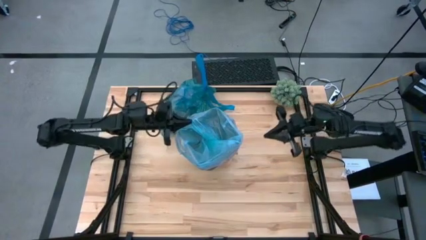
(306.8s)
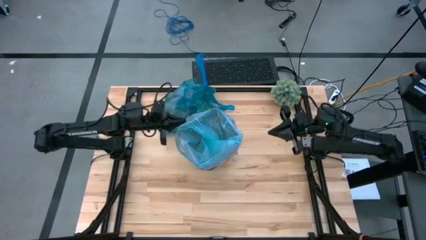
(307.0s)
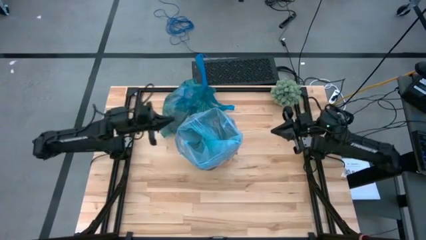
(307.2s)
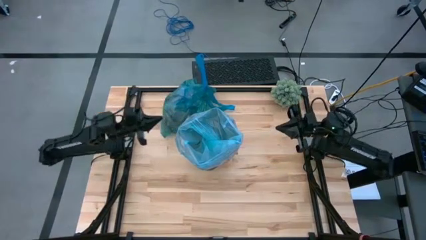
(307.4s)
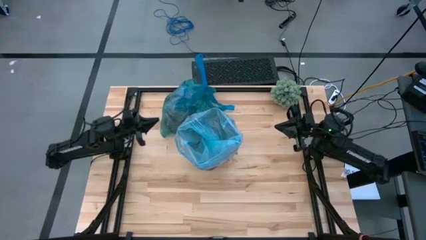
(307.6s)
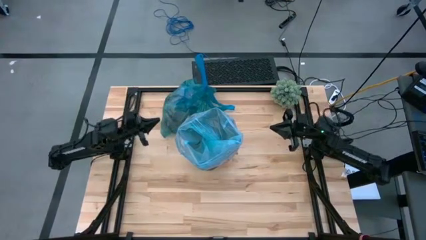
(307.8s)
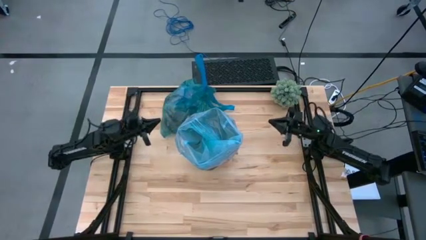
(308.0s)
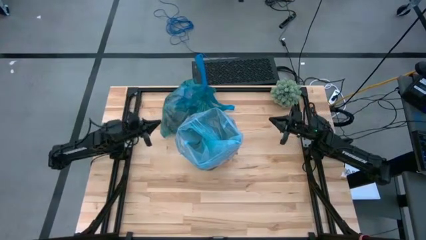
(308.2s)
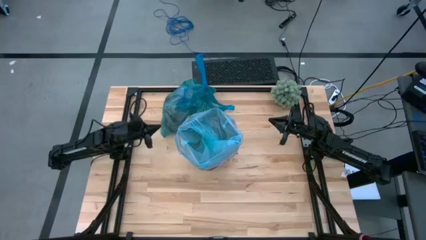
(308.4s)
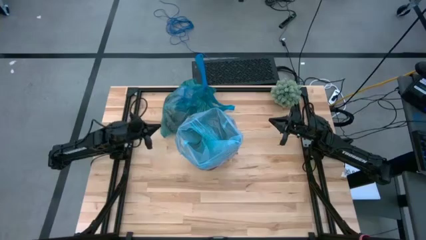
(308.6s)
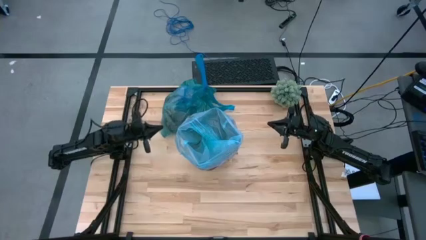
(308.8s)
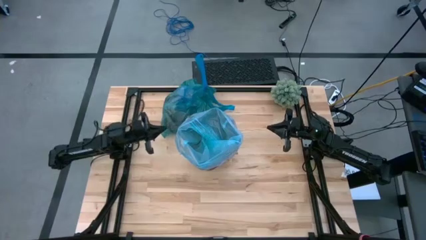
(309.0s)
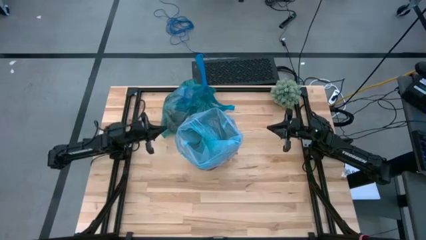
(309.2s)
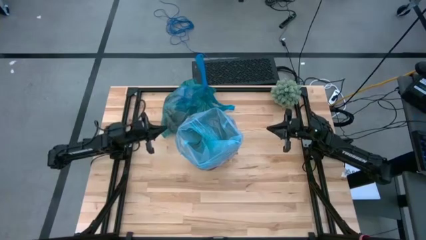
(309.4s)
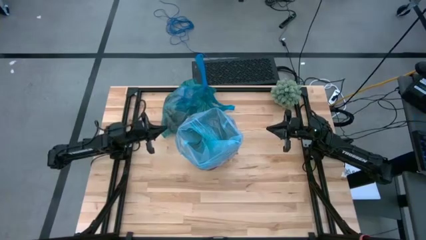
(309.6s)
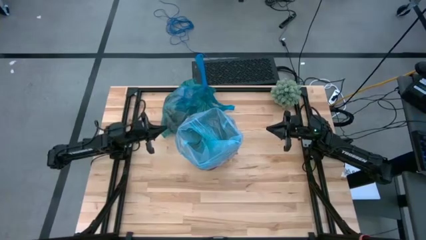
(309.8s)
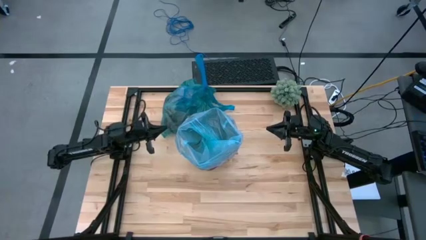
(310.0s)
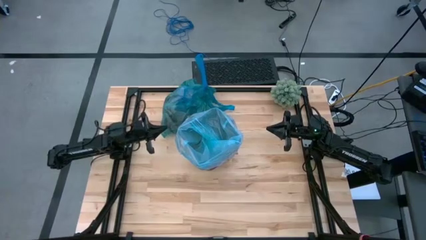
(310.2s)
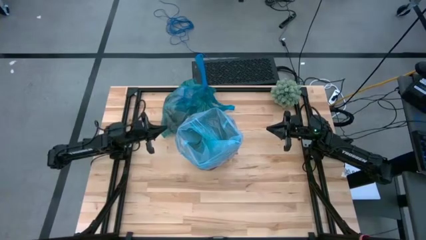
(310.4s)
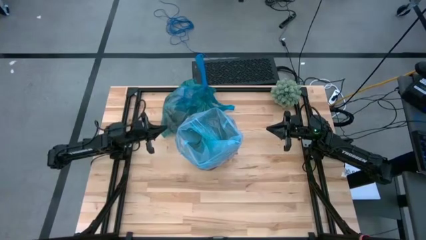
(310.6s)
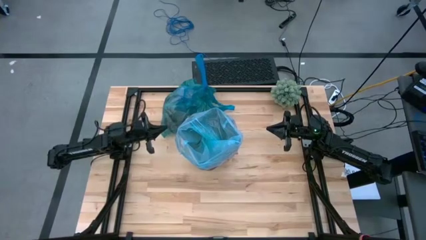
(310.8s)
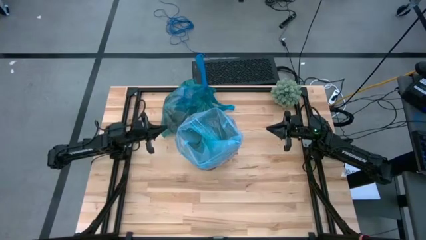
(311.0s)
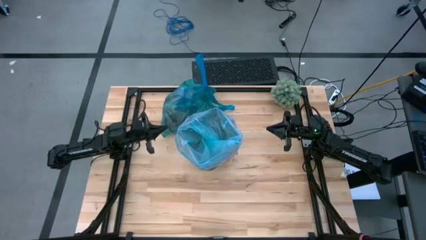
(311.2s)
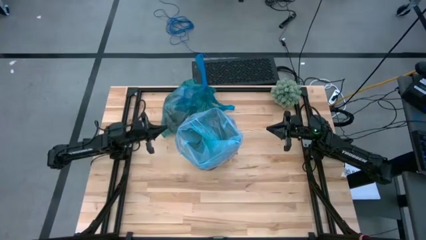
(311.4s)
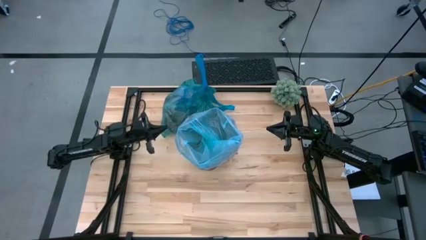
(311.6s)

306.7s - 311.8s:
Task: place trash/remove bag and relplace
Return to Home Position

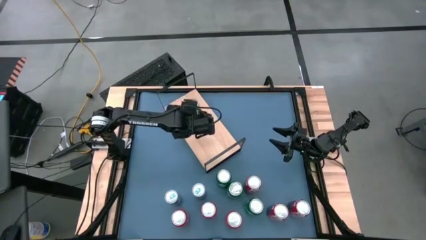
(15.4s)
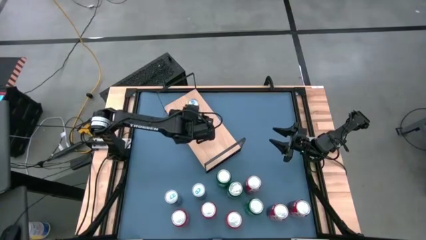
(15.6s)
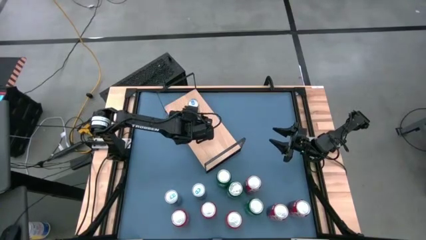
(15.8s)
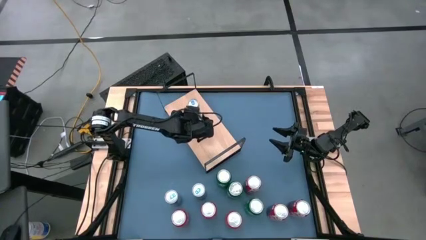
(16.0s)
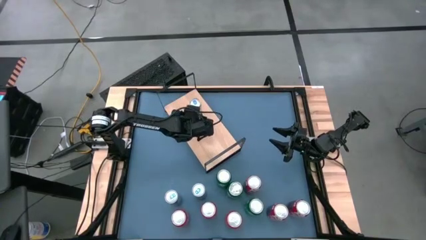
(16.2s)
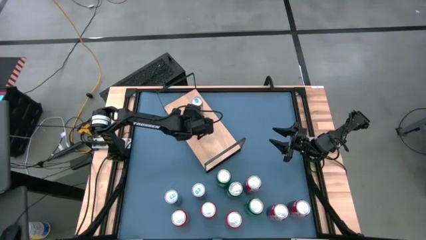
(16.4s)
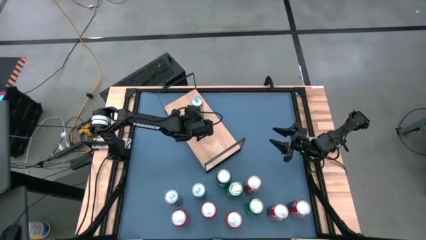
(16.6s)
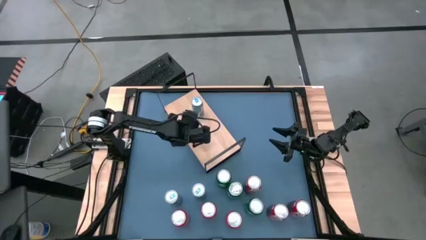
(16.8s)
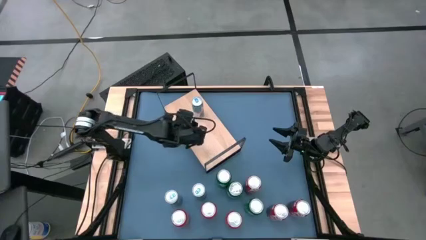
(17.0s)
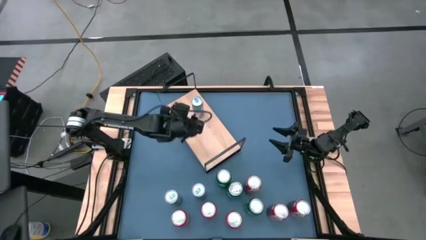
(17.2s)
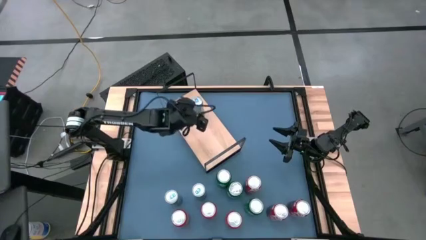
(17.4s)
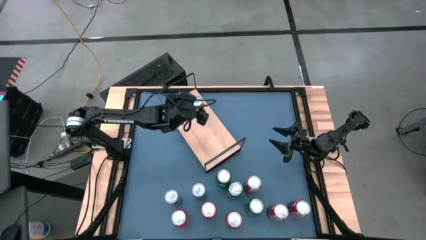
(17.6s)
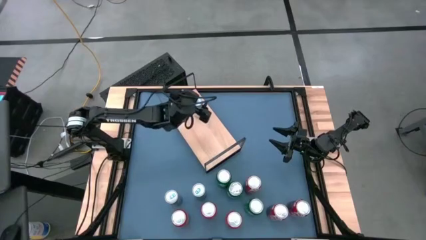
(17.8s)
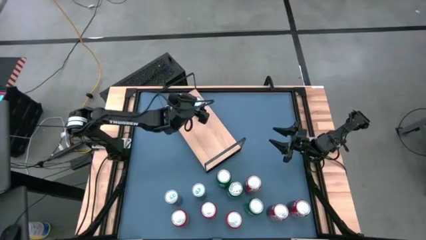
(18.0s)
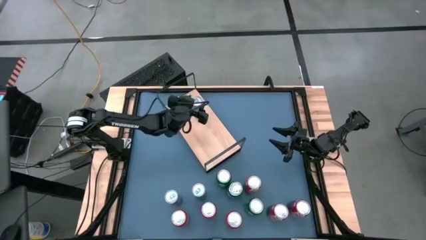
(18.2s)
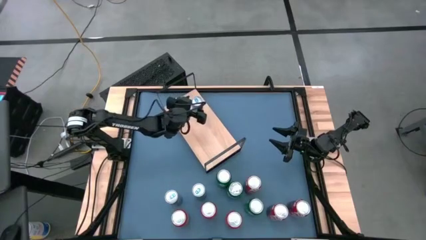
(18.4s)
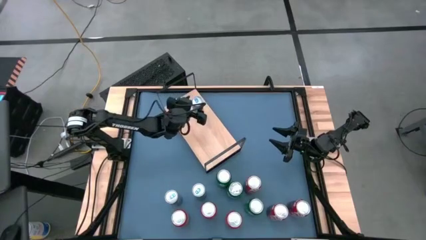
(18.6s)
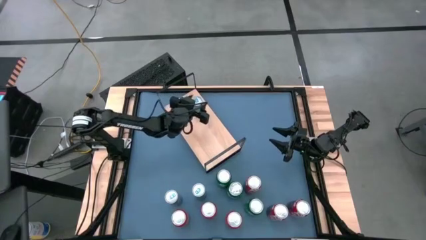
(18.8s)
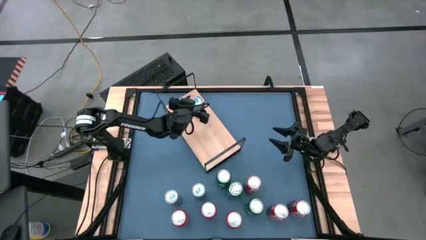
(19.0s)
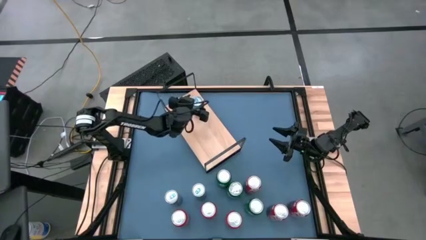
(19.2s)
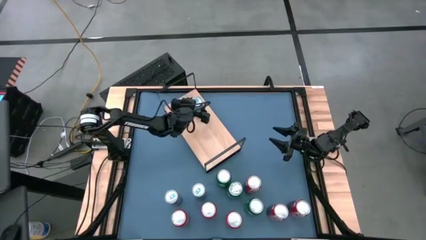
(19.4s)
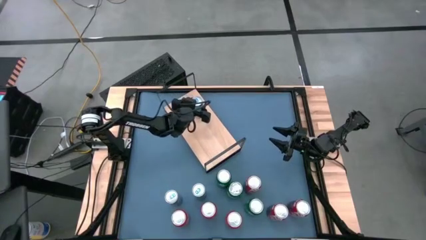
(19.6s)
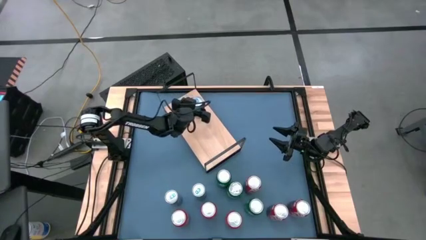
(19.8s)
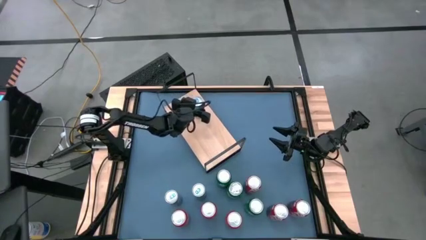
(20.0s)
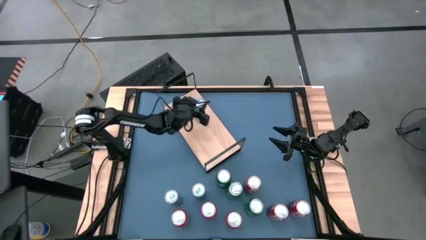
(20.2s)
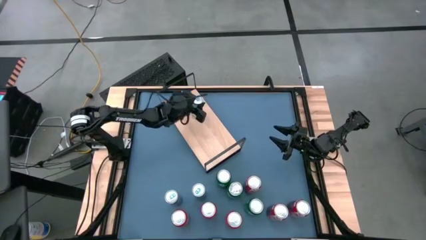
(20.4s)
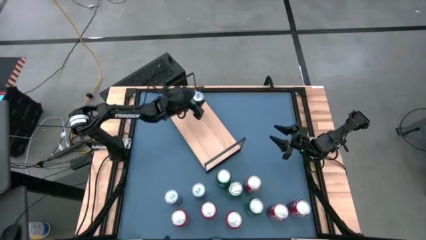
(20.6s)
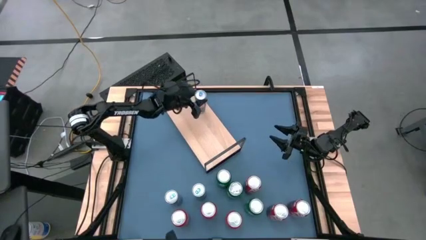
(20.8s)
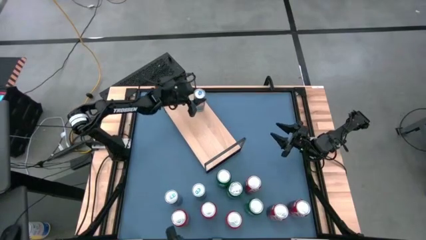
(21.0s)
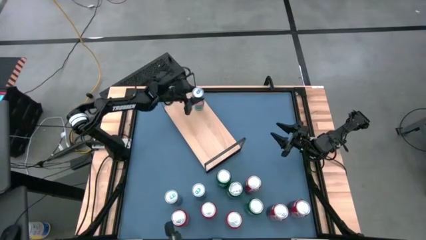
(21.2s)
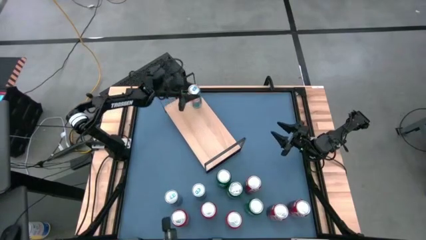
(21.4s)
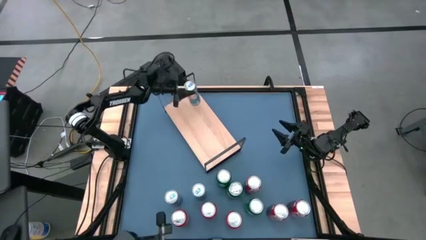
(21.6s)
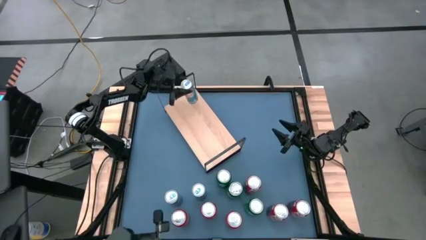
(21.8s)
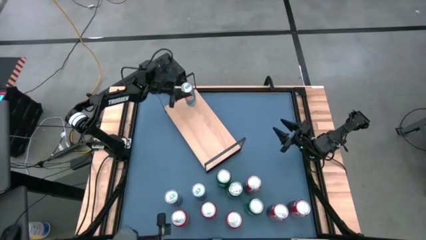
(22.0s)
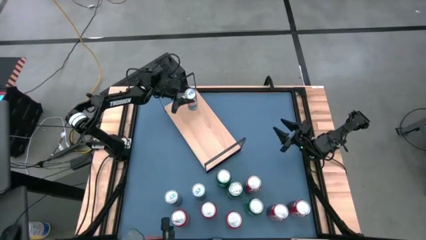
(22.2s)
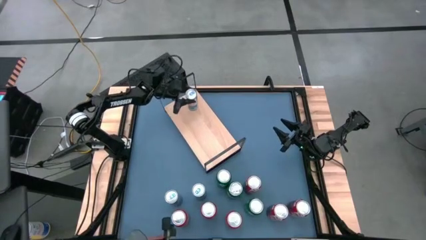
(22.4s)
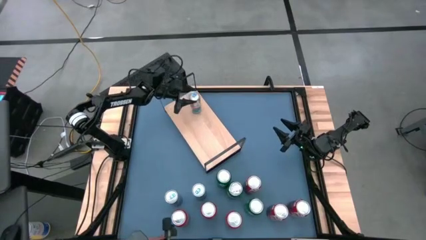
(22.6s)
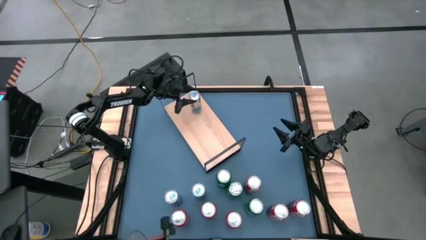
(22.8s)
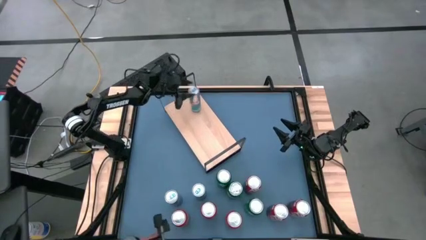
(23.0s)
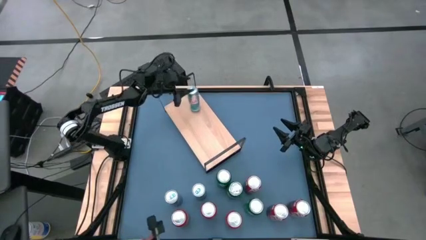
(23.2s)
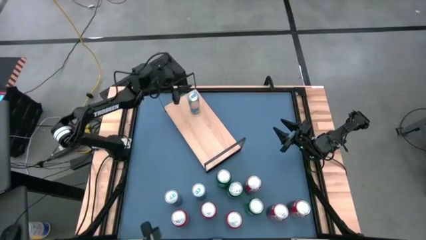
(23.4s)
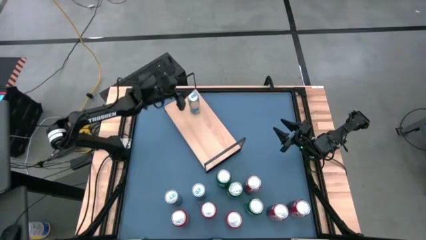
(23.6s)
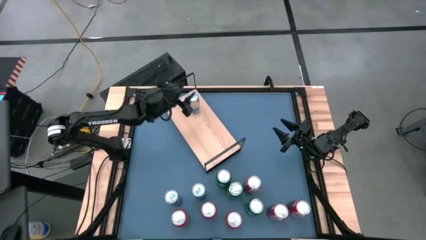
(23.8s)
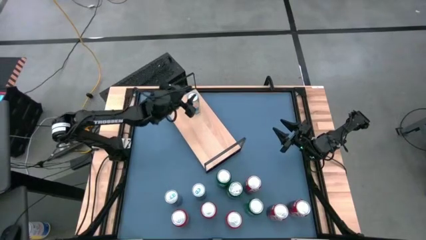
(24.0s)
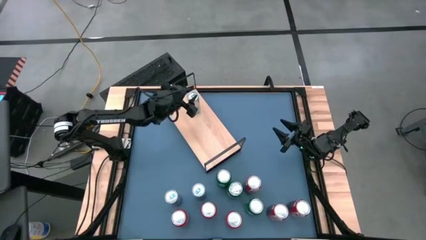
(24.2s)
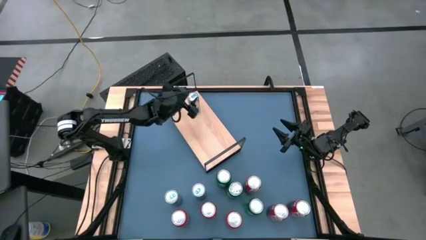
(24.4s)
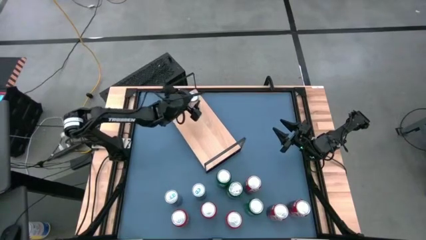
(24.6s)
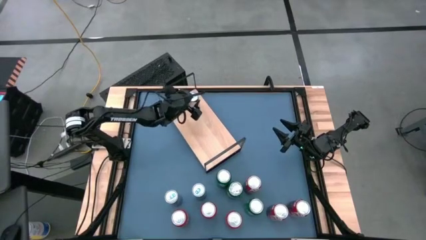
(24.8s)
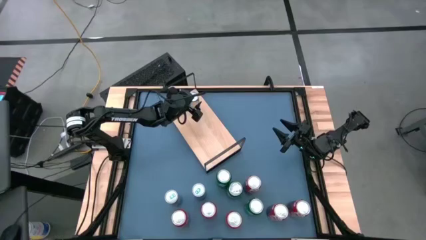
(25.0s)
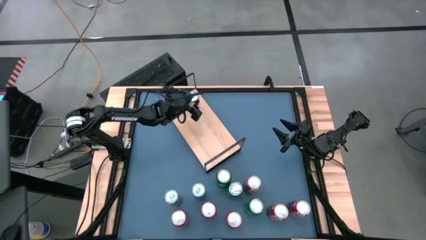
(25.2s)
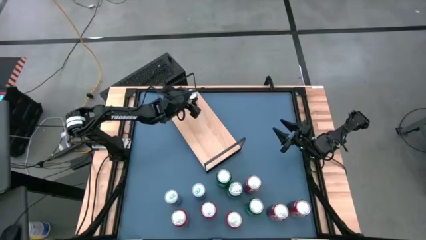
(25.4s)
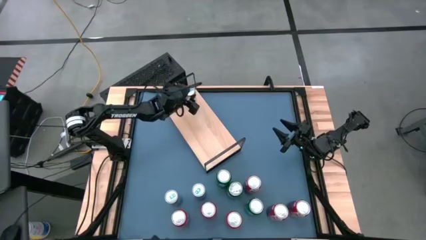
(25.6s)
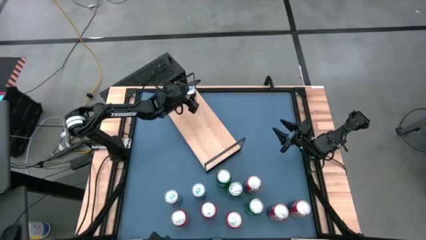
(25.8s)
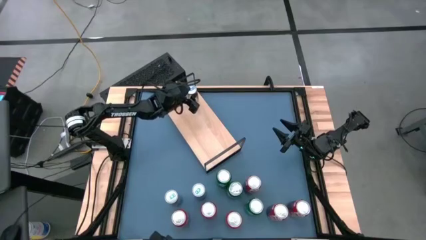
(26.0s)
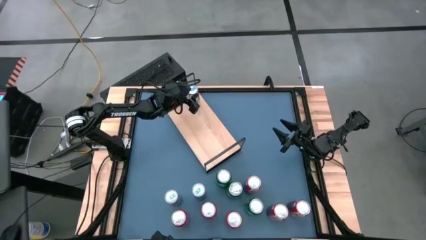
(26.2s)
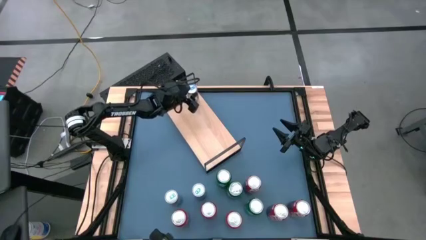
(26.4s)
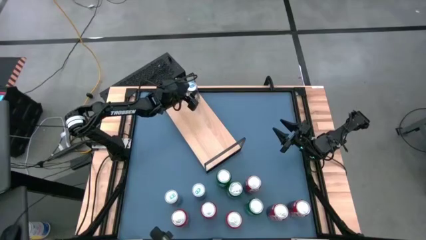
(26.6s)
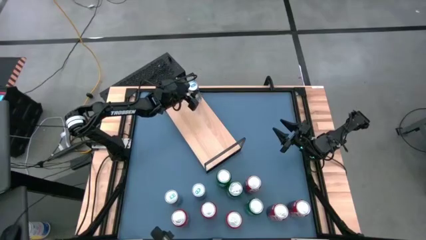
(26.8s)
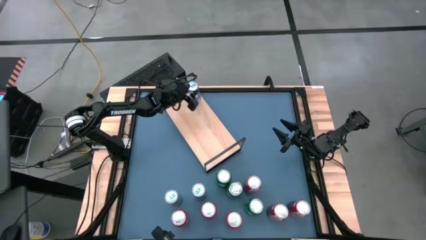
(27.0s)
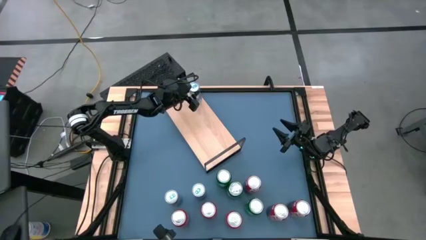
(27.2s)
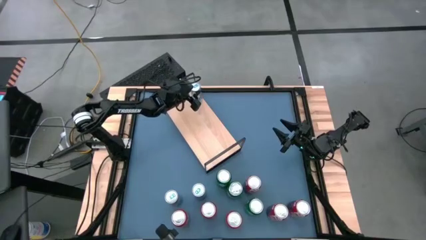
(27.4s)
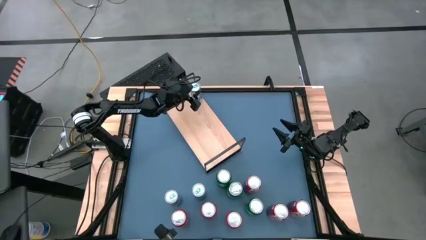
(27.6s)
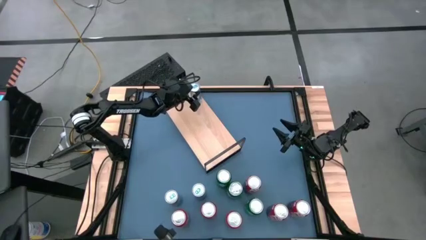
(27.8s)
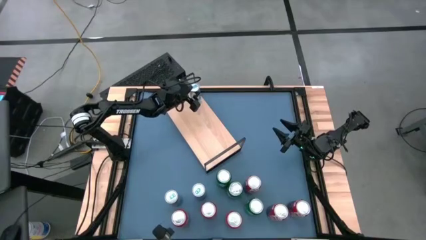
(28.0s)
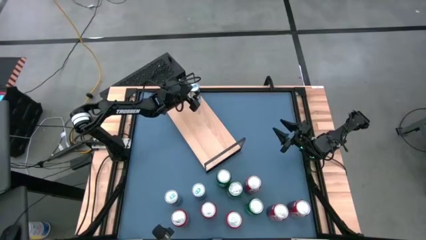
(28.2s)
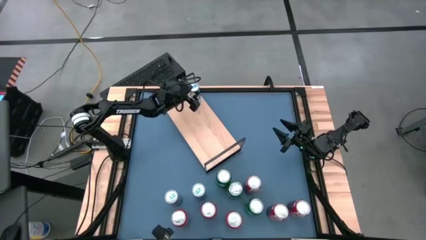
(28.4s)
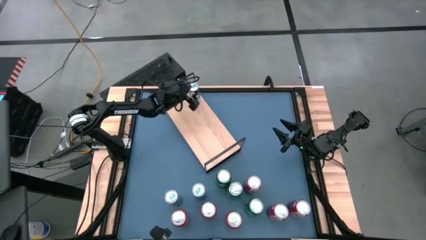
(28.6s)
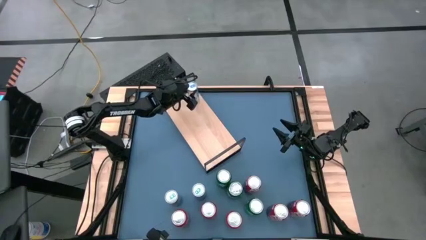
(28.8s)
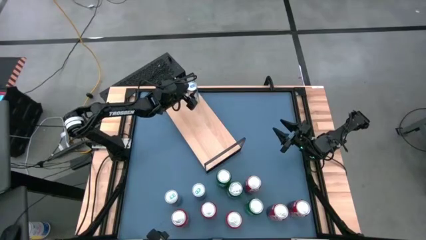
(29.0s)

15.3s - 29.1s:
Task: Place canned beverage on shelf
Put the top right blue soda can on the shelf
